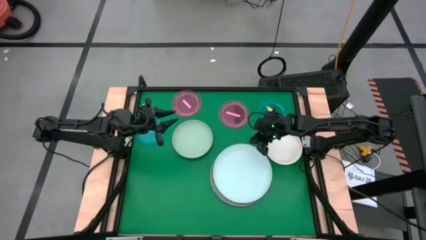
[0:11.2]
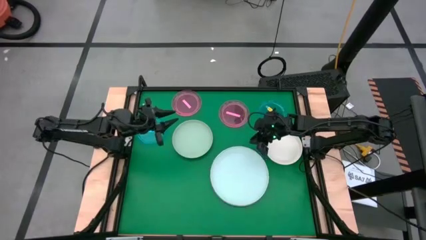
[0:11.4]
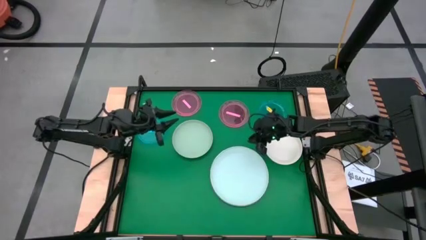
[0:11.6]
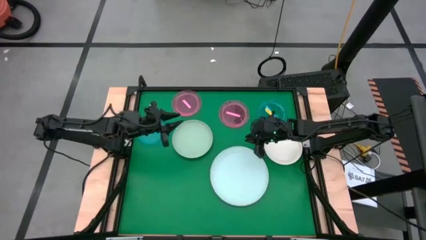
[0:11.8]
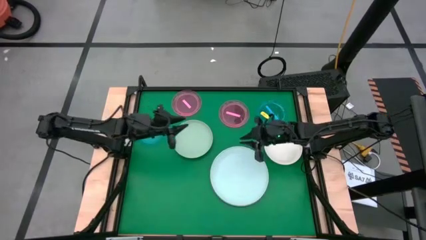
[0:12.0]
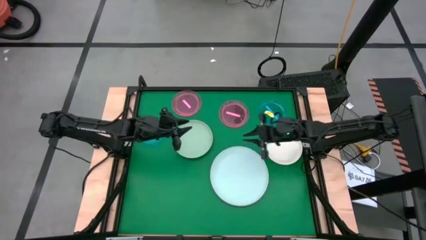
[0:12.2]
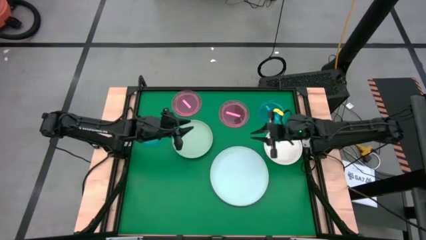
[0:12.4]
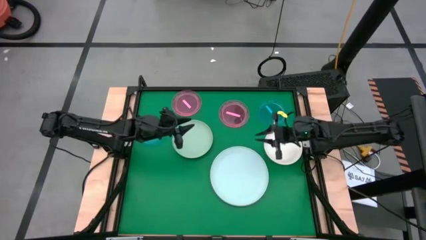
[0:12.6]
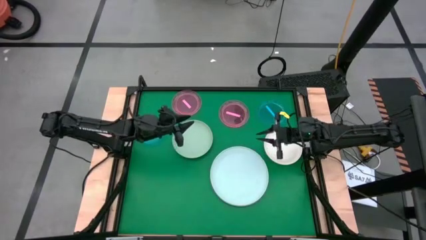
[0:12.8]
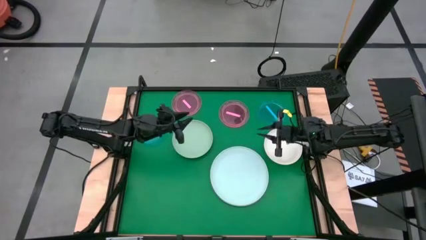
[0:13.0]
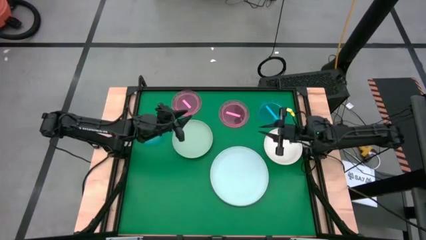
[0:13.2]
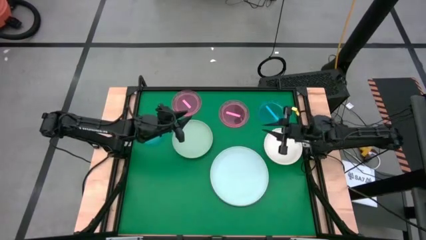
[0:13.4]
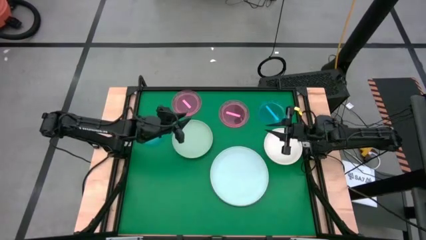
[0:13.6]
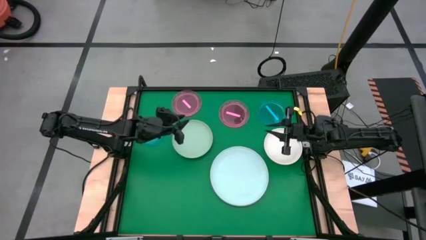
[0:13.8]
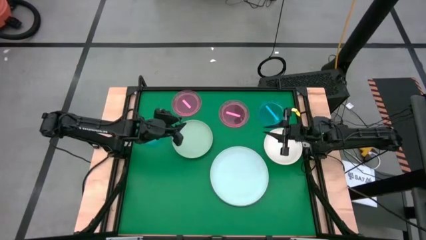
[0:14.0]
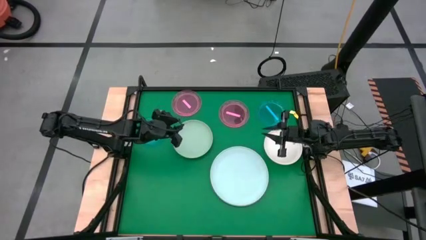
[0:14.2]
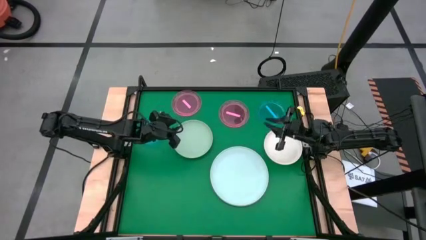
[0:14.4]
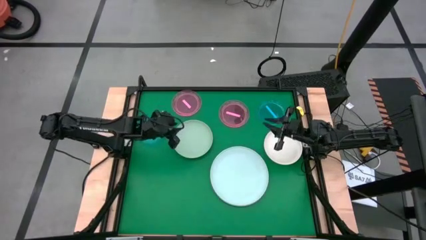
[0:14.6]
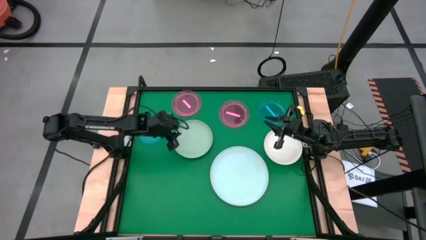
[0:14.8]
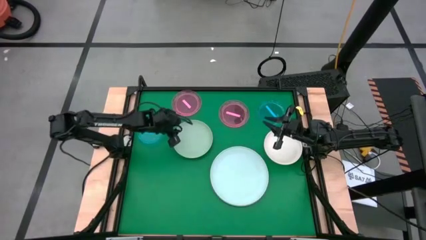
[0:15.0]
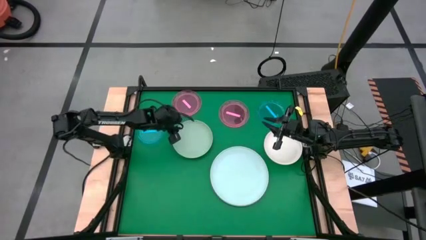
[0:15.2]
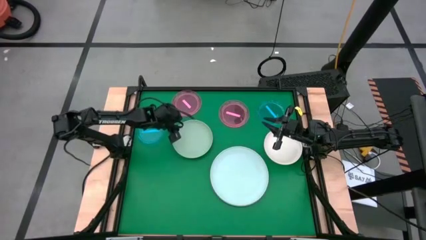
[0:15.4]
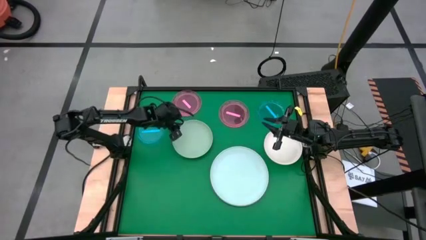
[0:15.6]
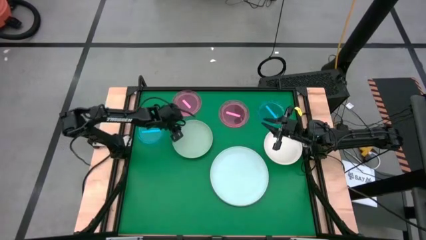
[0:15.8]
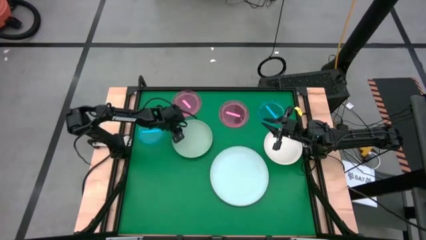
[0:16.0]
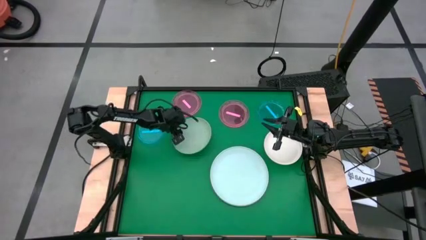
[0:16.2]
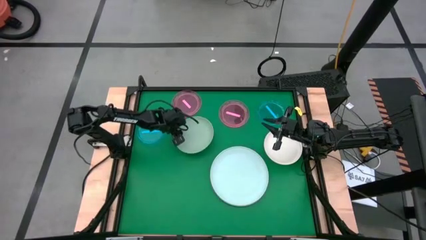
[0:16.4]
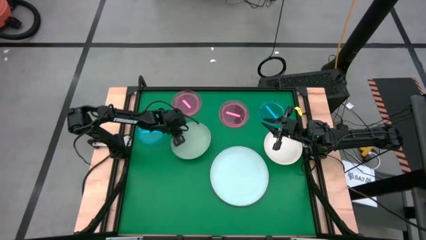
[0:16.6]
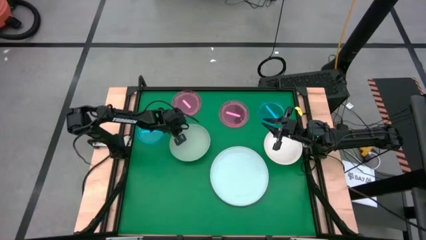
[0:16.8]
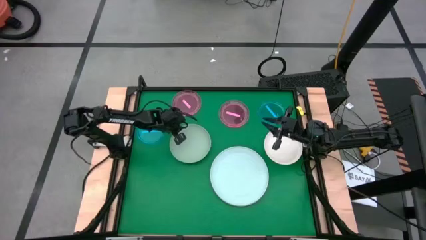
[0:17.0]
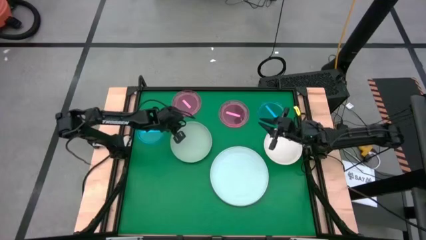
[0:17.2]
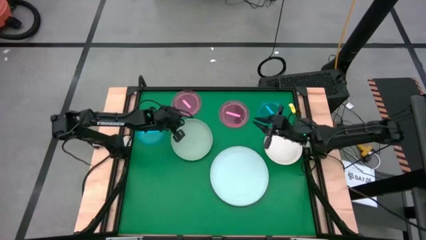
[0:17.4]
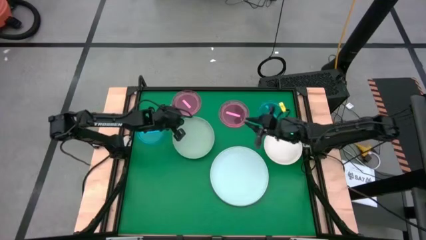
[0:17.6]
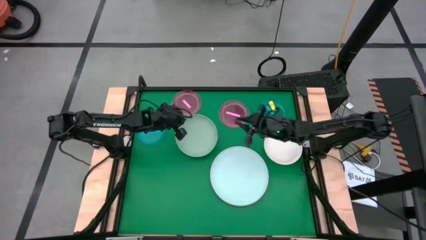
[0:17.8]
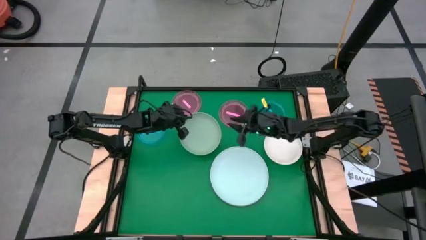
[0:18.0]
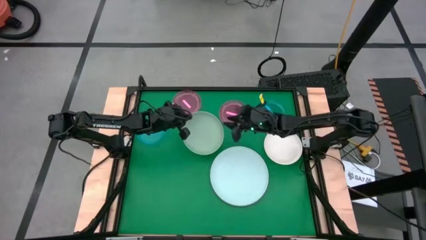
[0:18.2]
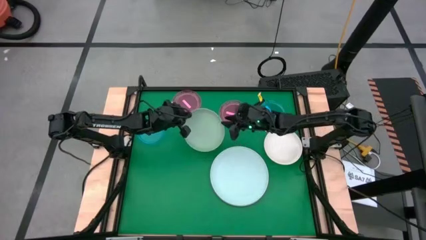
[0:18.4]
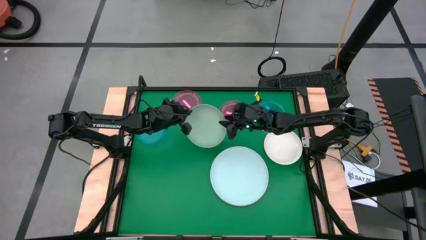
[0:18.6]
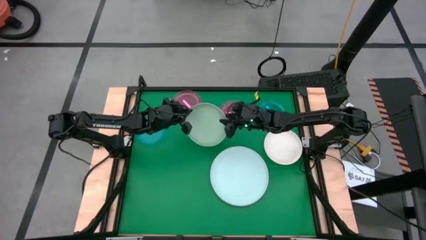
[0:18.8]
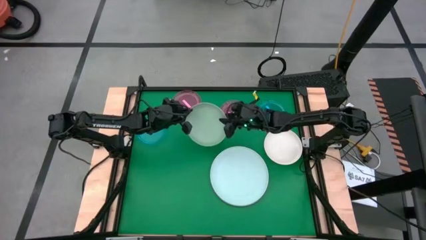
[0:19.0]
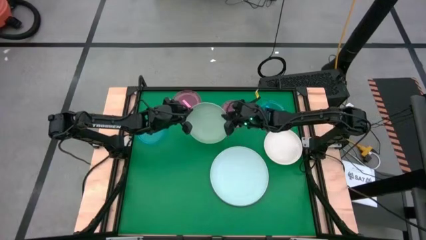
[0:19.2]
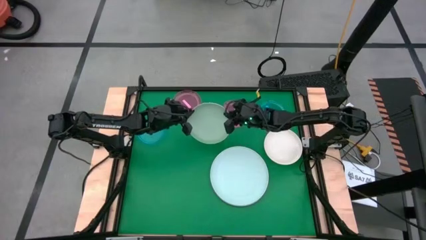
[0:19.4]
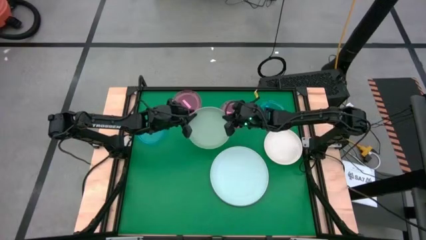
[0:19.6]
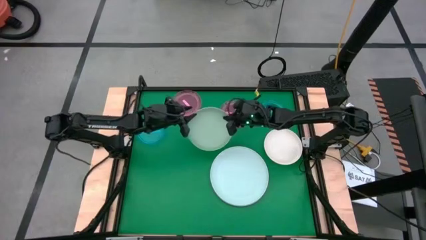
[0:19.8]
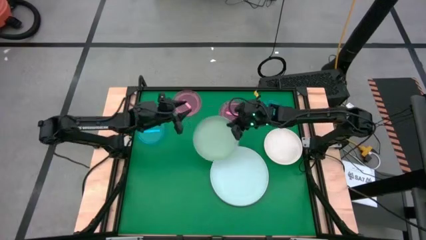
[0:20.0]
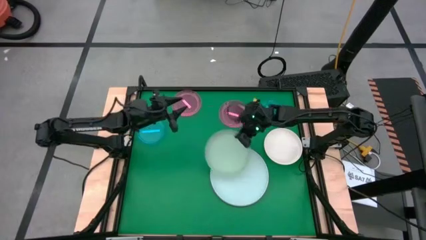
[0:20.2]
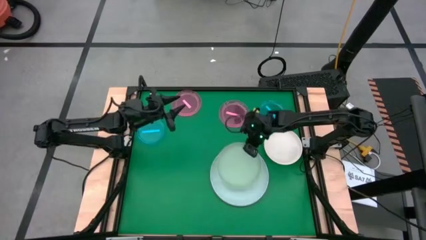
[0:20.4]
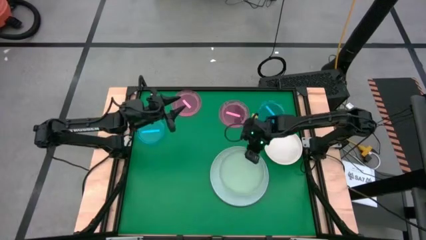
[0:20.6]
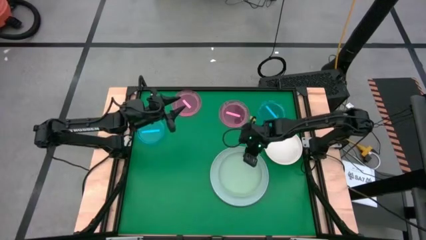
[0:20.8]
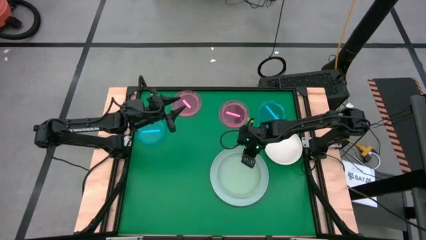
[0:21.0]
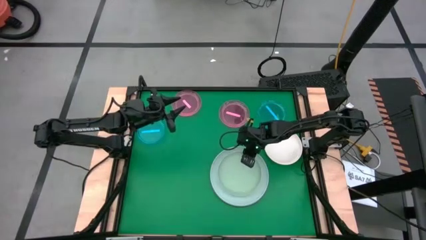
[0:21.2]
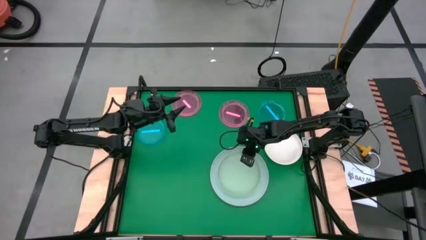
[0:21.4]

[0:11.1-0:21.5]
Task: Stack plastic plates
Stack the green plate on top of the light blue plate

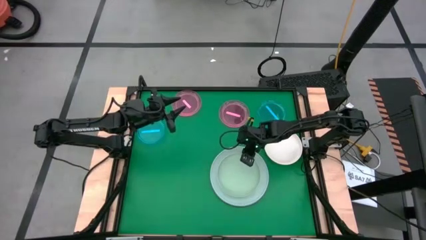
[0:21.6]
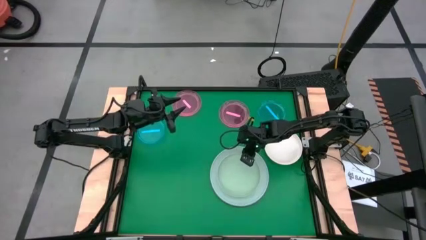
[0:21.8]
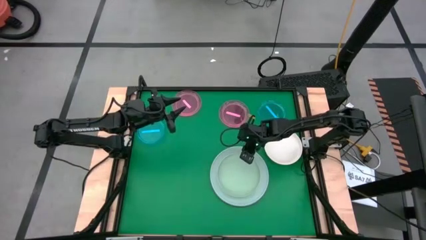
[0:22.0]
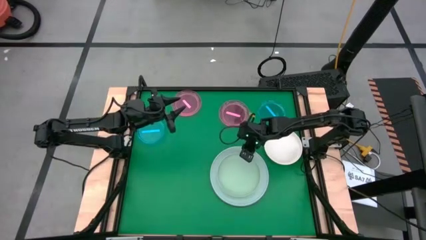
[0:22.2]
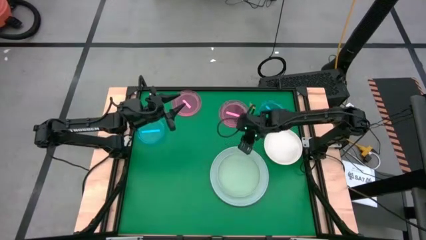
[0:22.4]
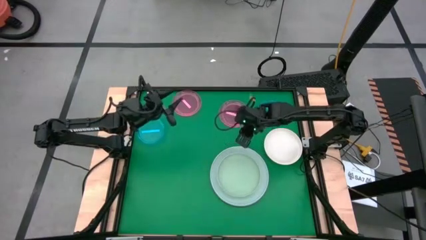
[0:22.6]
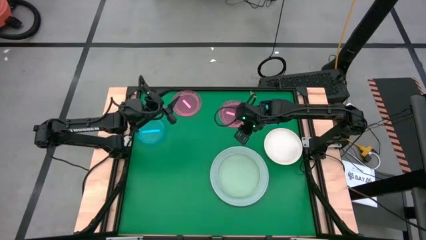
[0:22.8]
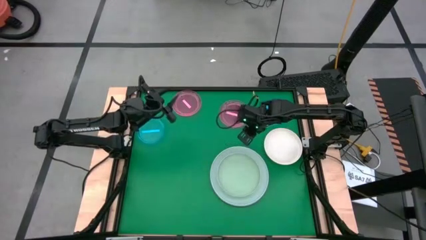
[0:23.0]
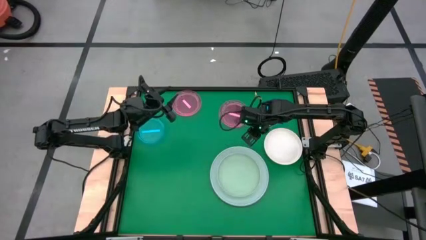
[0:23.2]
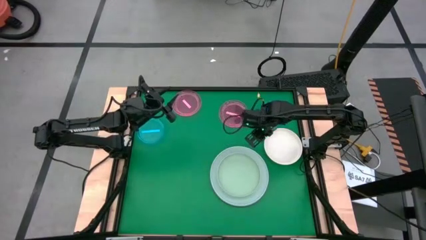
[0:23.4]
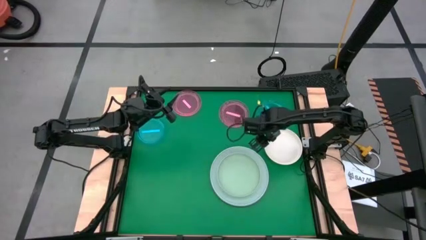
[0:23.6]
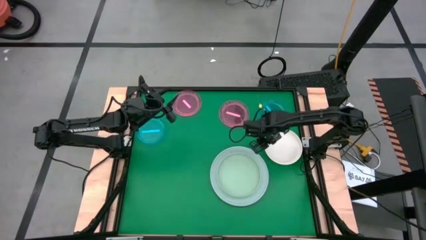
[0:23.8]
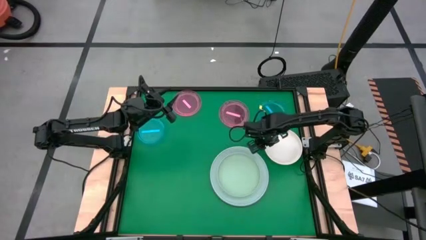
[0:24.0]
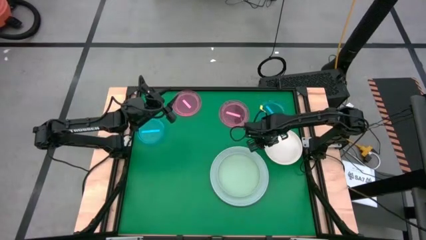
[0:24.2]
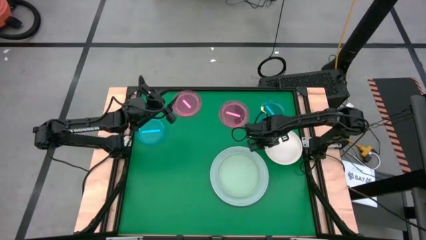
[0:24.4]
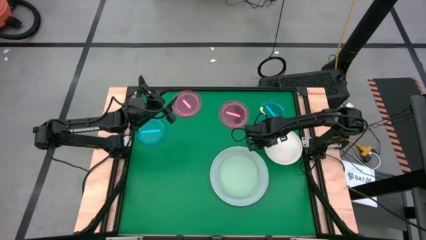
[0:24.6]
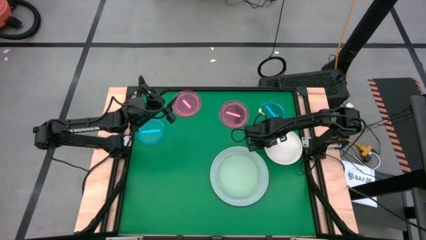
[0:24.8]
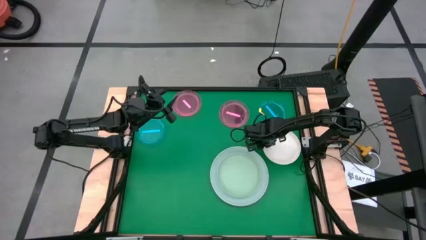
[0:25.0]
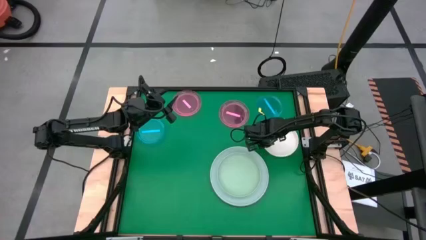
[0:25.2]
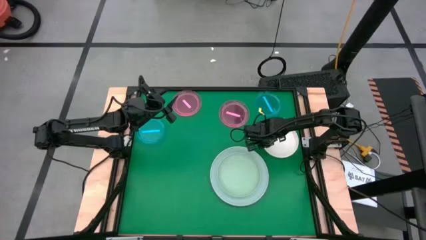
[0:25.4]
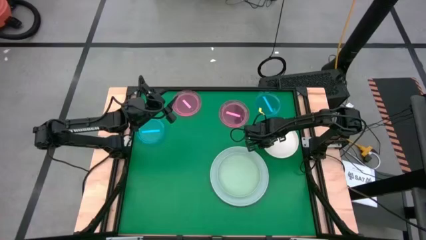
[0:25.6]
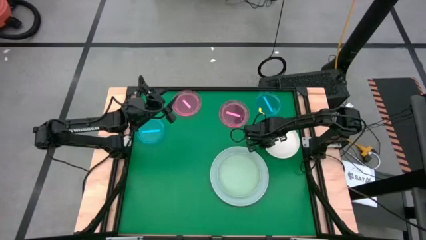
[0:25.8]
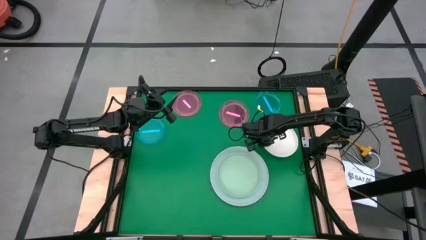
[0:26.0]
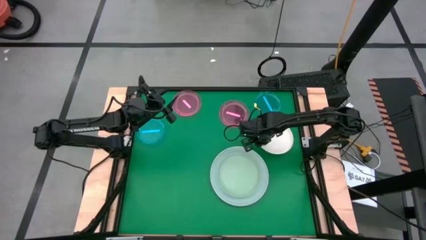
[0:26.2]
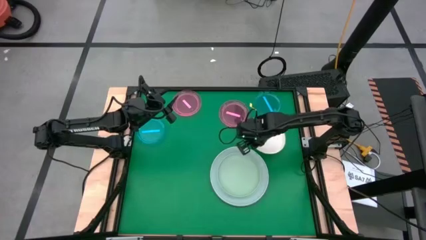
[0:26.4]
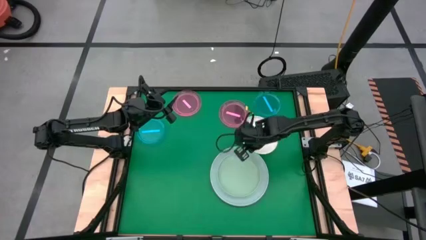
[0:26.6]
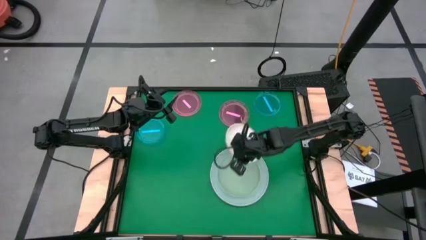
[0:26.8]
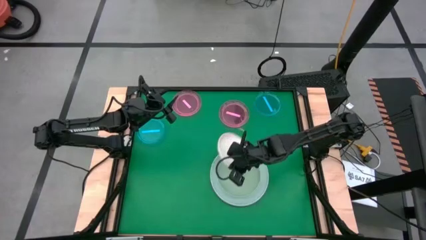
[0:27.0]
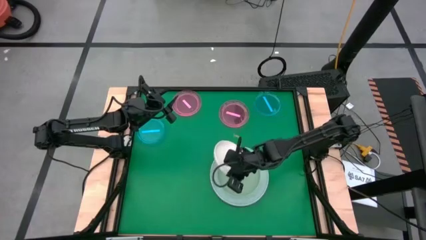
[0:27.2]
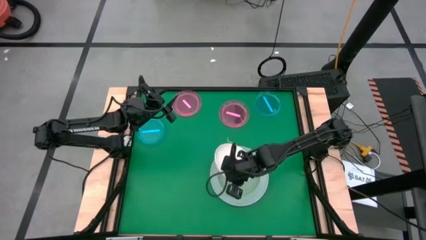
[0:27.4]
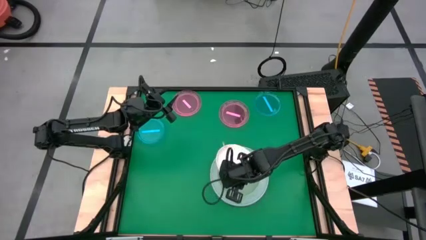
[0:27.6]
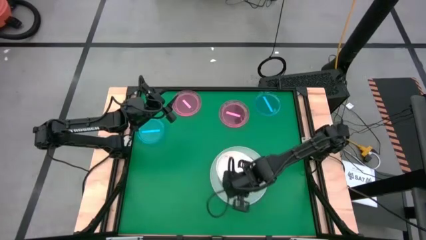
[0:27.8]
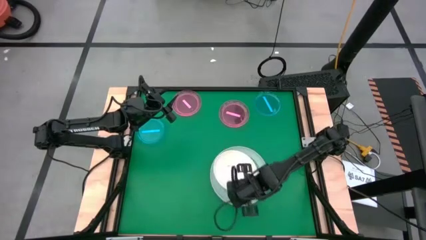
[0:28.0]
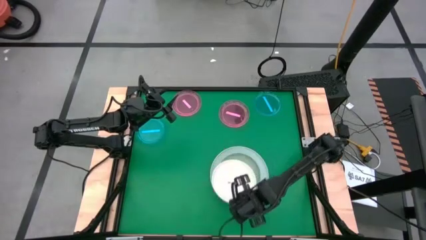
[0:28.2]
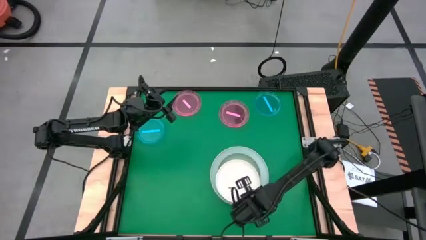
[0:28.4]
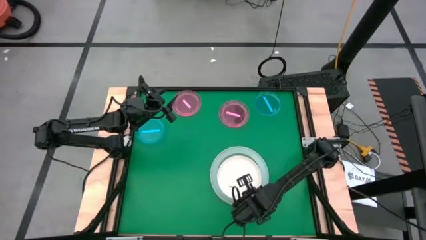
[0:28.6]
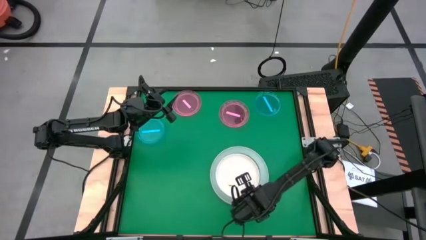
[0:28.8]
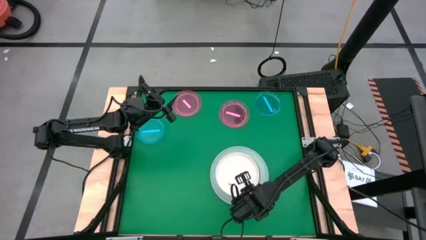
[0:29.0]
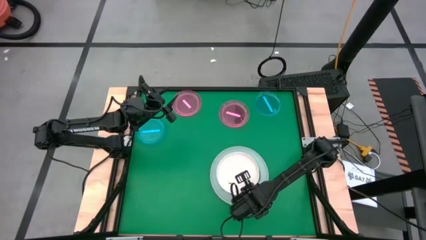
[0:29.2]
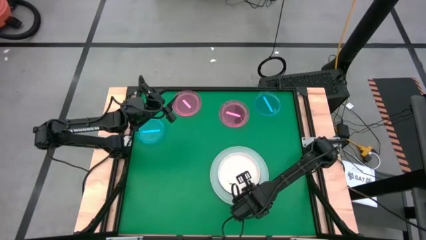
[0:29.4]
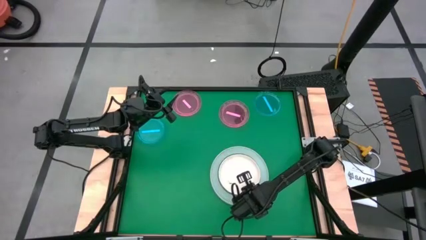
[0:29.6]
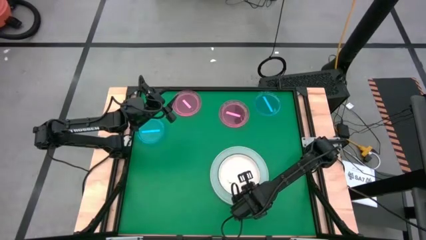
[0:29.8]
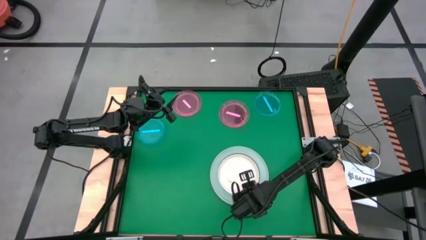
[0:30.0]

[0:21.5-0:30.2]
Stack the white plate on top of the green plate
